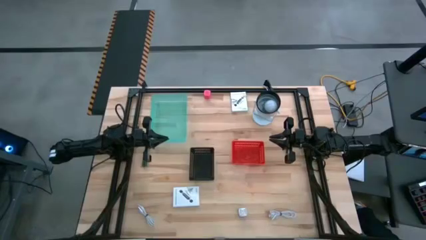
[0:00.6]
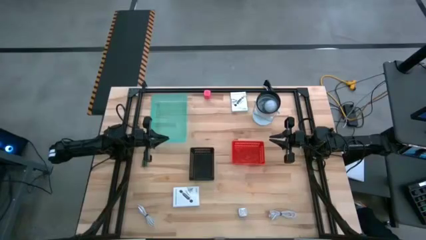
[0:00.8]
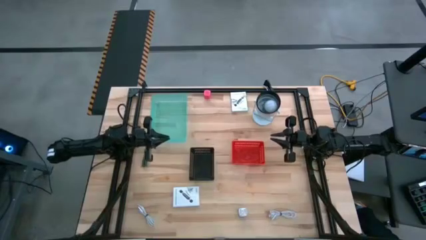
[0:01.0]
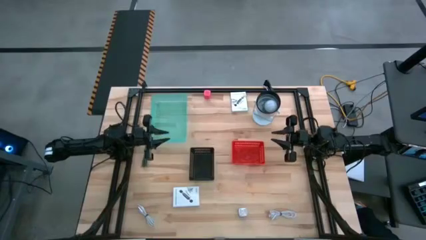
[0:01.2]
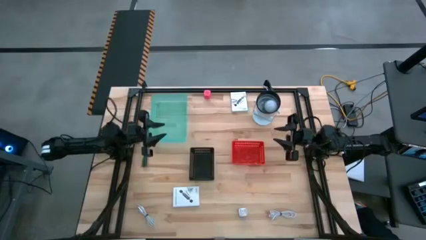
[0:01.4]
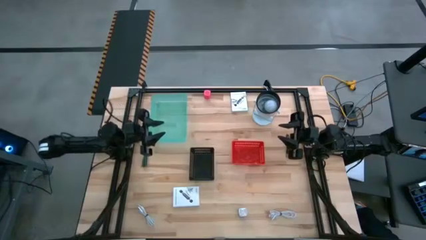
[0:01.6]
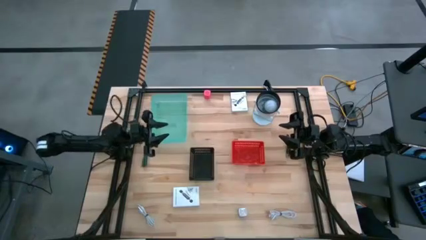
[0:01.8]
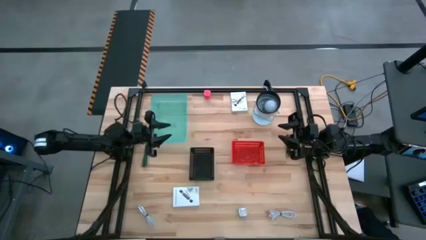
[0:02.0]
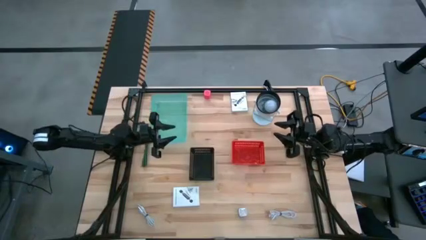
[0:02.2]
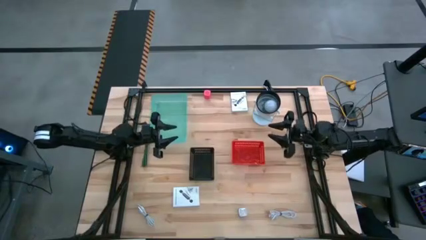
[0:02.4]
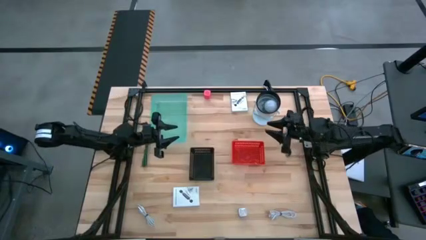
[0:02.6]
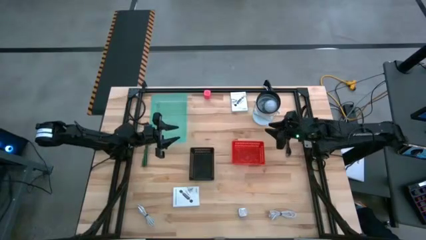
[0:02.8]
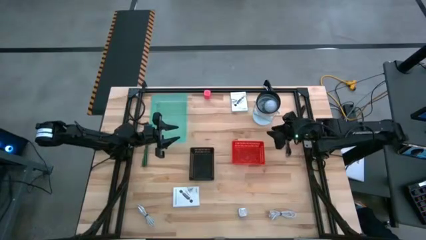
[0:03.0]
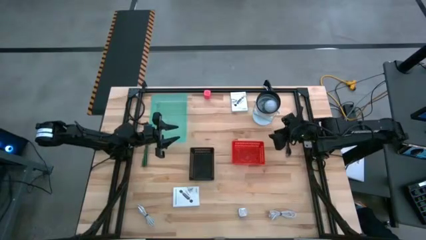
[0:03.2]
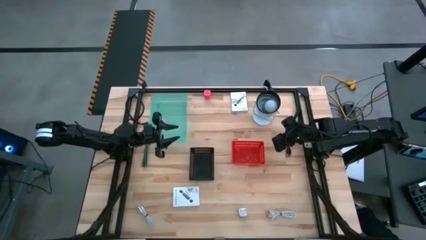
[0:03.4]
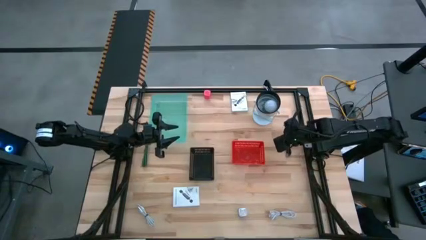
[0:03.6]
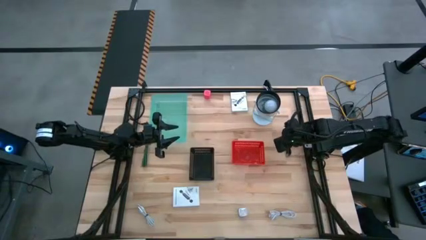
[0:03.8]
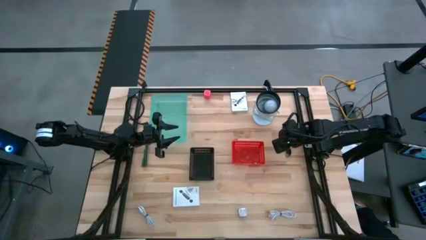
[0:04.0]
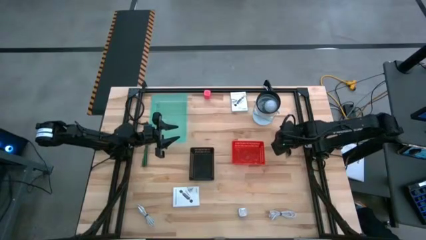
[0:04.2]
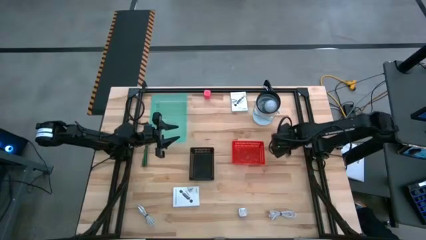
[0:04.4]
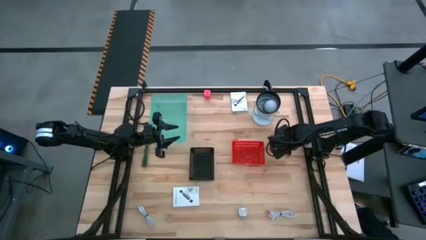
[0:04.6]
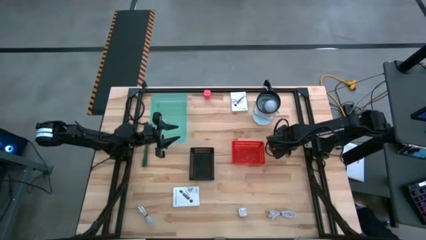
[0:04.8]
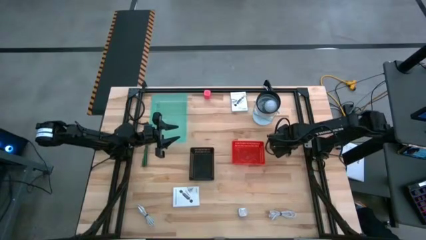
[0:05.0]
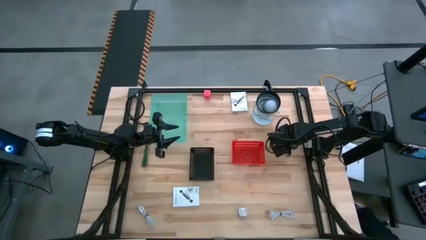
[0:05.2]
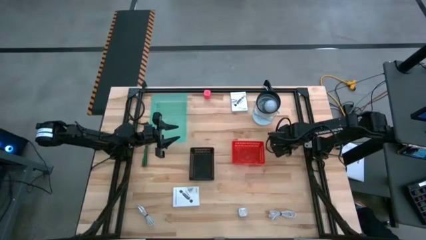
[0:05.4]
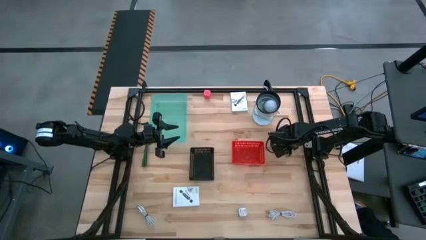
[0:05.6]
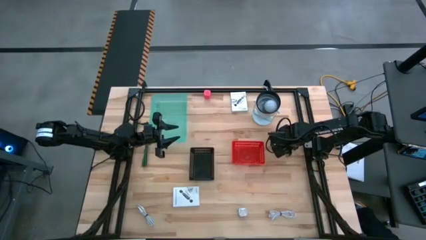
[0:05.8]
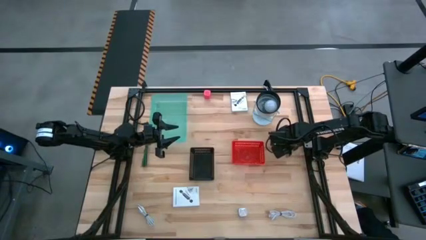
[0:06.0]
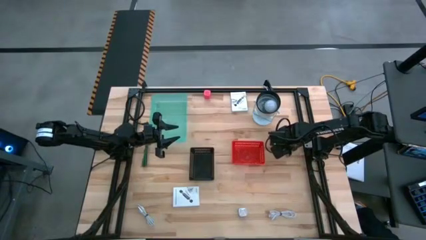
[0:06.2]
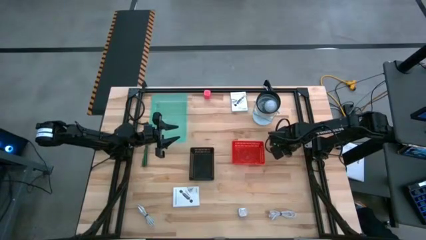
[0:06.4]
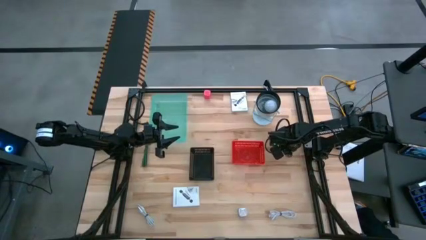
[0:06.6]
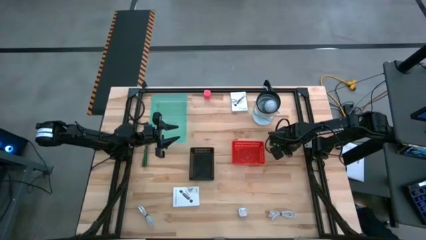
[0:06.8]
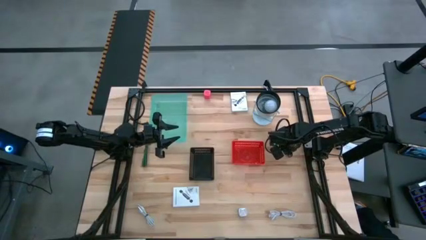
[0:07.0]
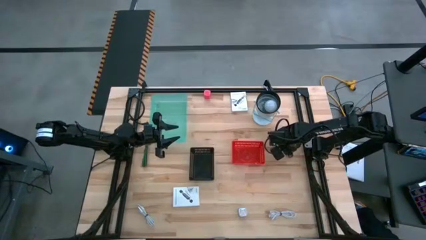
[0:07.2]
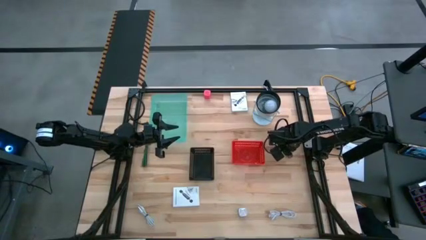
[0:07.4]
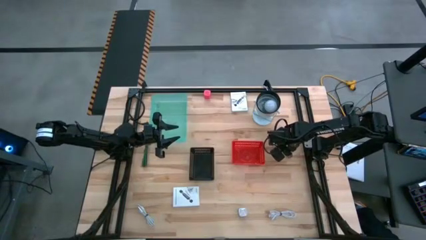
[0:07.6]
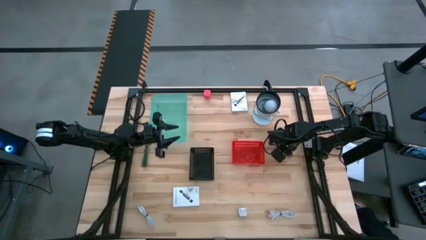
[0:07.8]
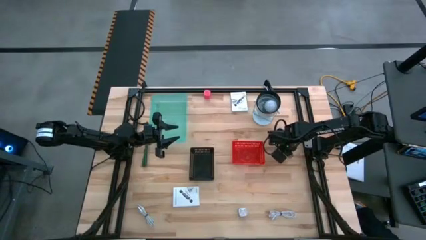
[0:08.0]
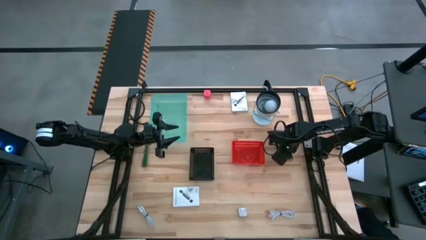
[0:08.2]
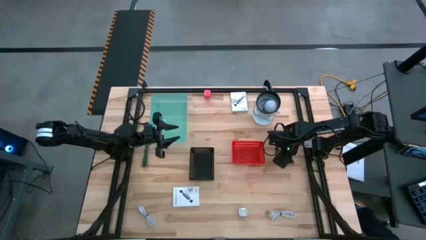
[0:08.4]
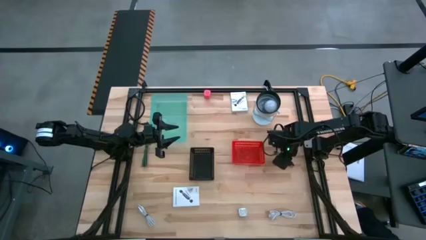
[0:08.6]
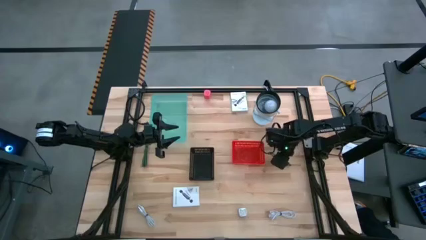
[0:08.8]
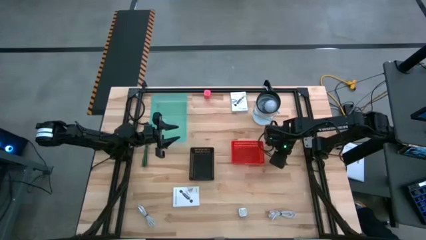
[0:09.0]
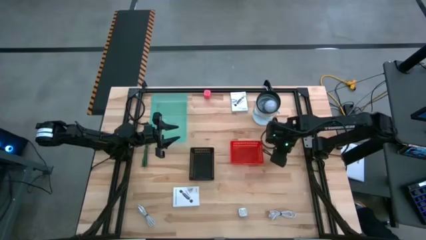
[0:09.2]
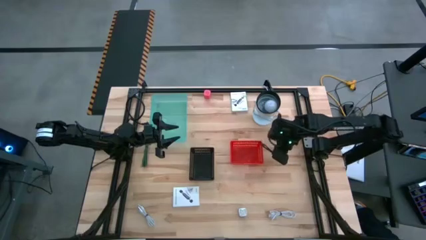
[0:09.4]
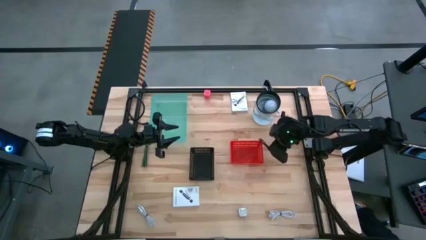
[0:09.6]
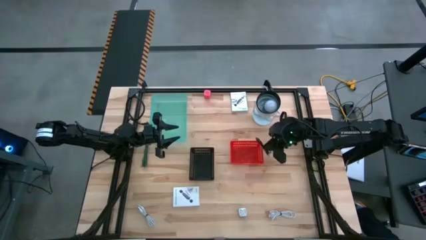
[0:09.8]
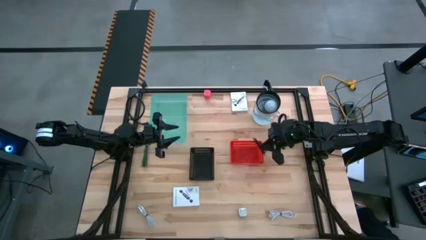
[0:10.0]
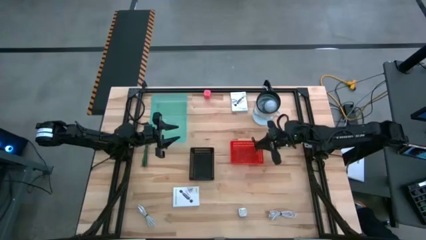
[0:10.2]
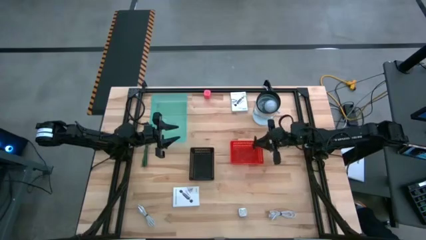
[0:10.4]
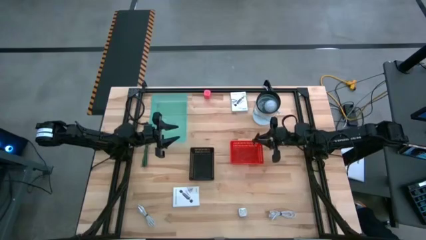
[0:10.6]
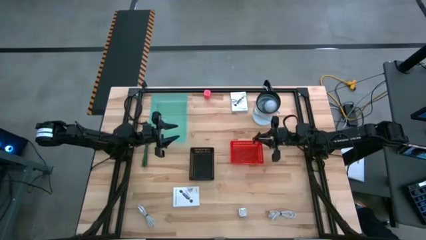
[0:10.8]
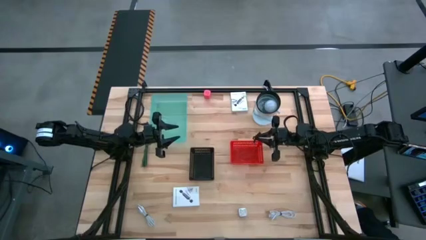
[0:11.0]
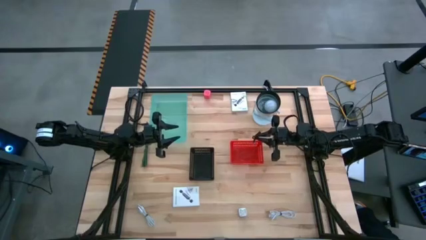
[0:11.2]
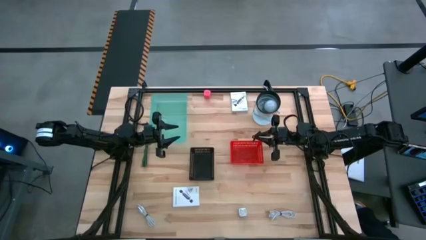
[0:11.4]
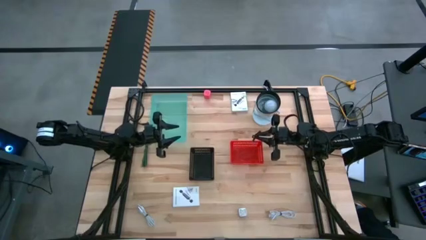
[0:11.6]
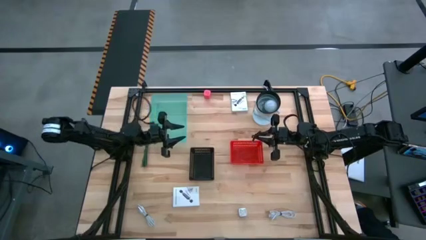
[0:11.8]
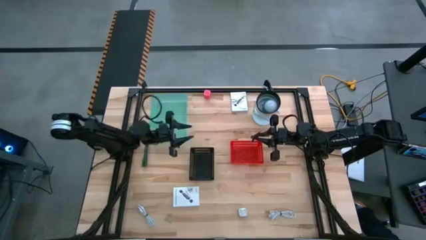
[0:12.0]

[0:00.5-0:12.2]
Task: Pick and place items into bin
Put the black charger cable into the blue bin
